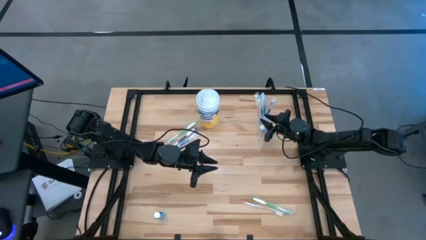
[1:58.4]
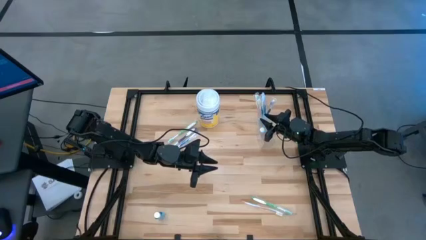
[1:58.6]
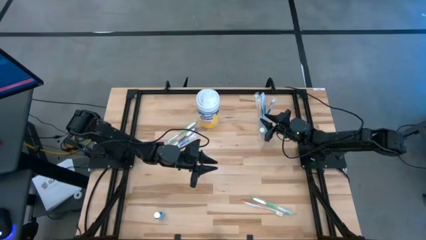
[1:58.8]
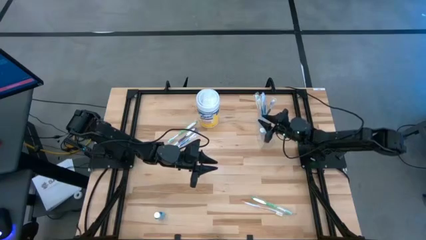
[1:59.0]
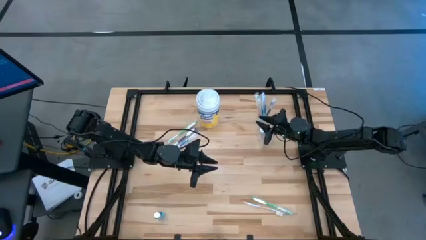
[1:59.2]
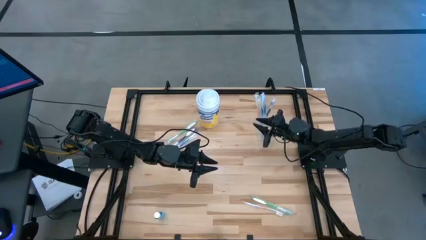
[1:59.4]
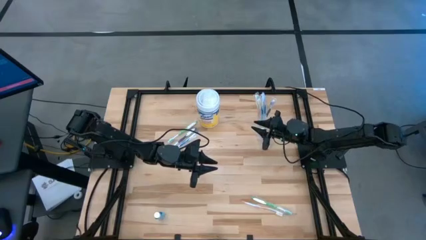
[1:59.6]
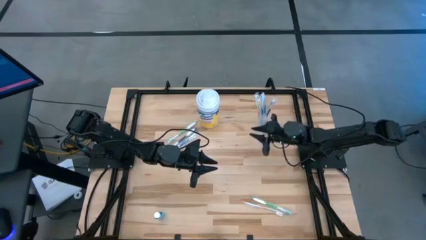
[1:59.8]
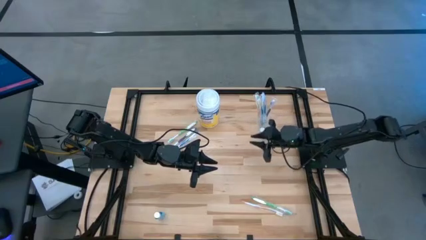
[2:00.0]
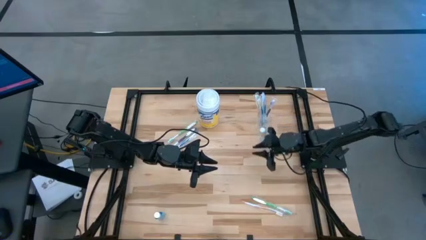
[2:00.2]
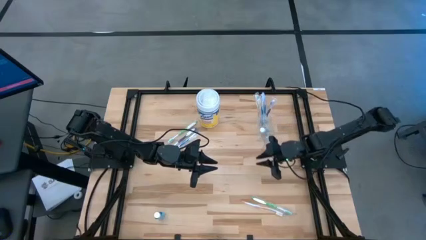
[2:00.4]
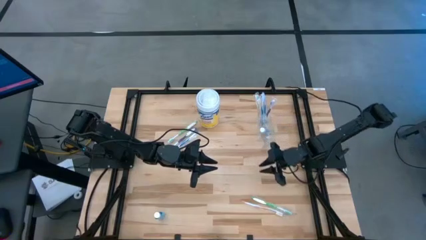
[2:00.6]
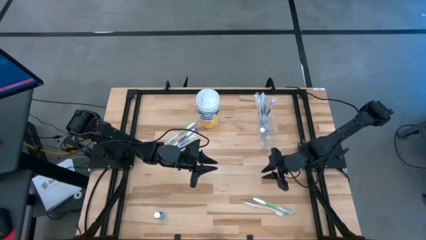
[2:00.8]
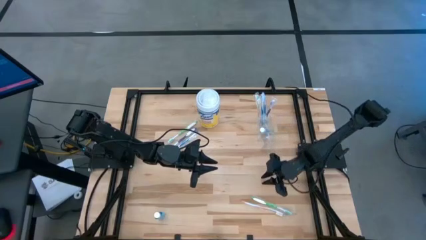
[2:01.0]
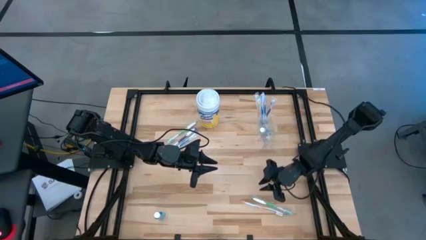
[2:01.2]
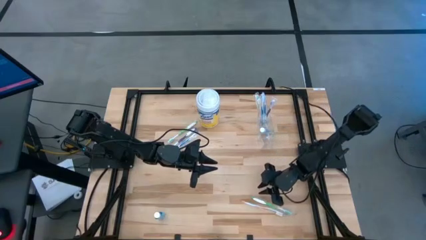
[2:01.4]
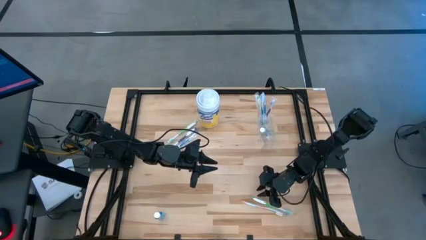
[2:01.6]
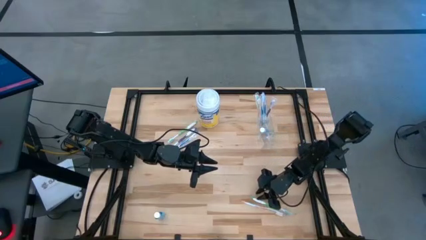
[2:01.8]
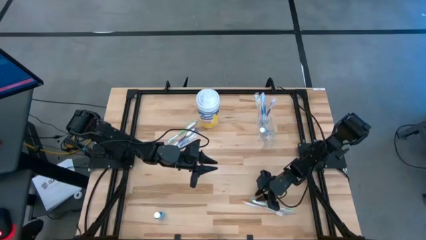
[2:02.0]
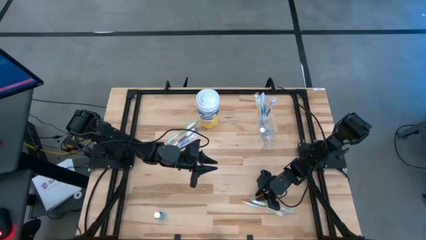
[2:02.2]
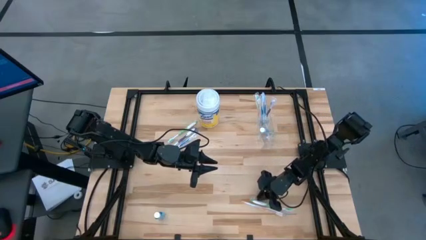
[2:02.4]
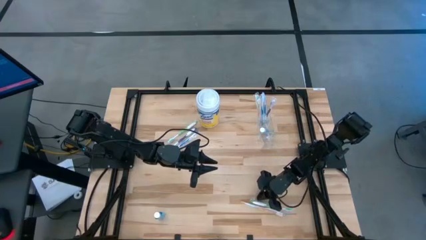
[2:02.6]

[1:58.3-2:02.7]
Task: Pick & Place toothbrushing station
Put the bottom green toothbrush into the transparent organizer

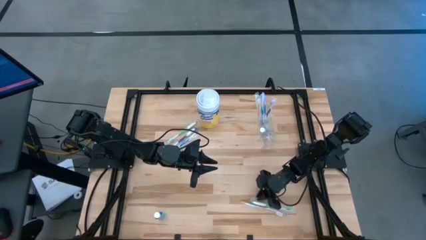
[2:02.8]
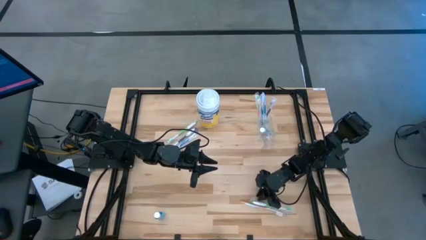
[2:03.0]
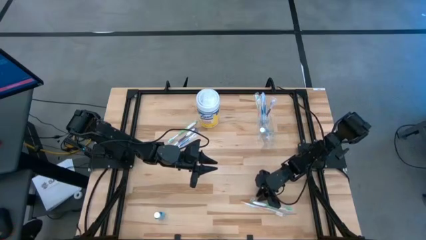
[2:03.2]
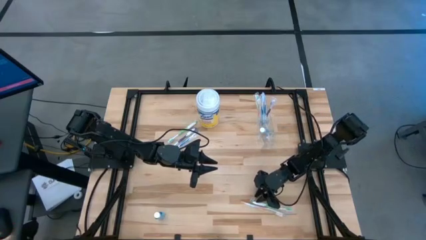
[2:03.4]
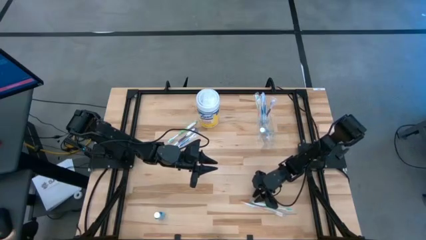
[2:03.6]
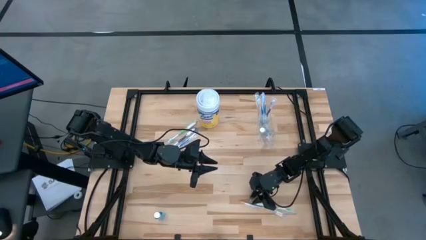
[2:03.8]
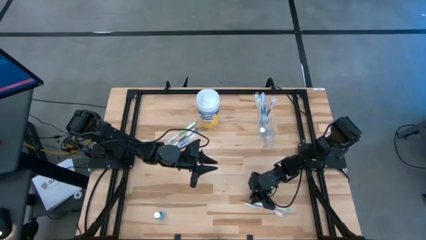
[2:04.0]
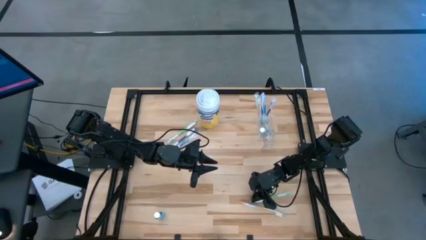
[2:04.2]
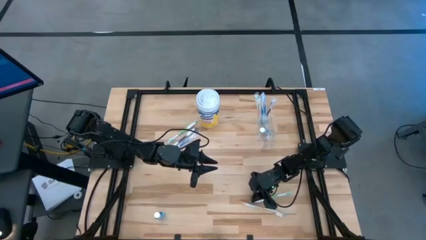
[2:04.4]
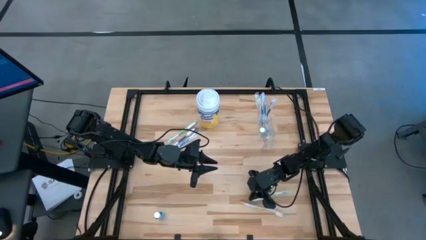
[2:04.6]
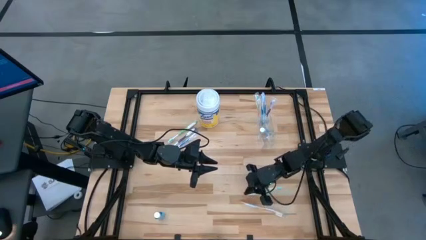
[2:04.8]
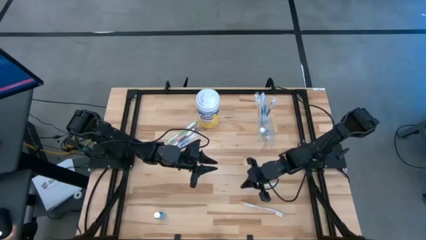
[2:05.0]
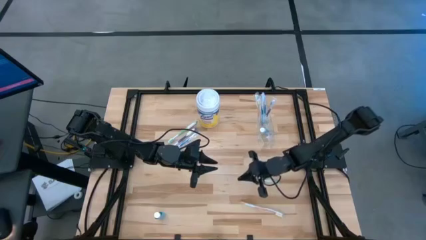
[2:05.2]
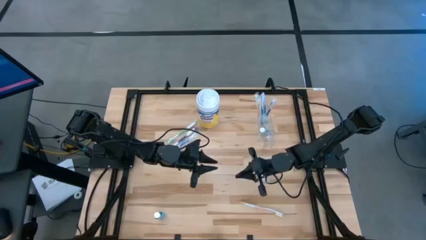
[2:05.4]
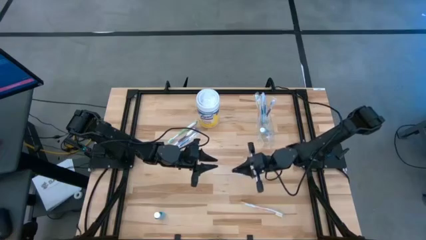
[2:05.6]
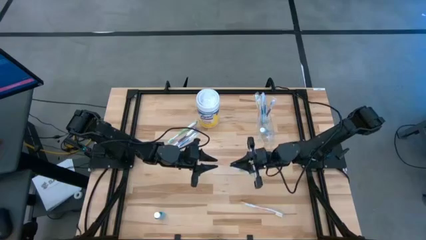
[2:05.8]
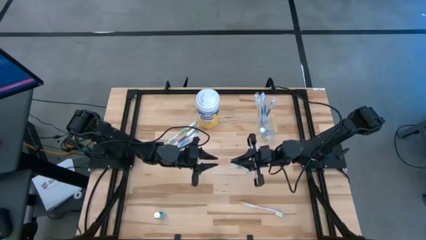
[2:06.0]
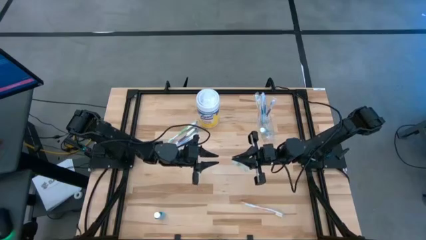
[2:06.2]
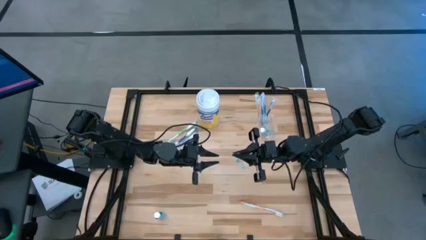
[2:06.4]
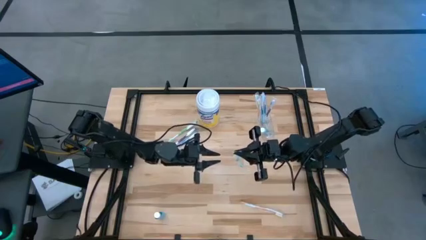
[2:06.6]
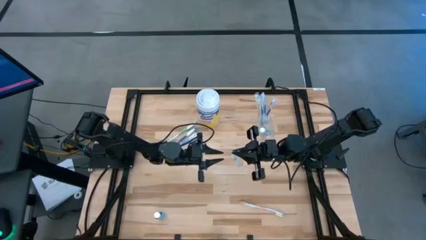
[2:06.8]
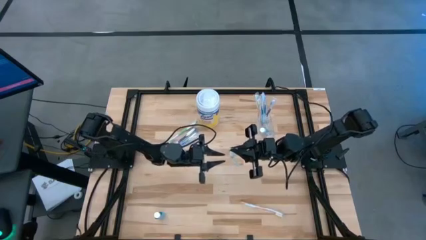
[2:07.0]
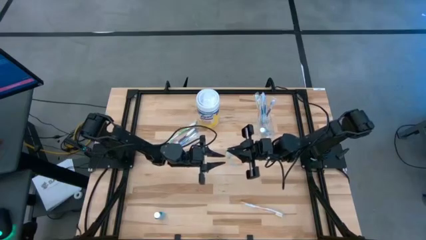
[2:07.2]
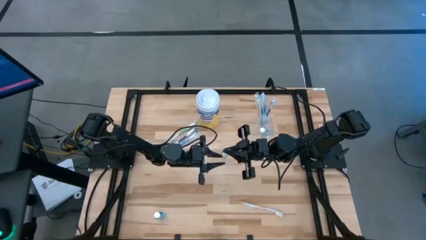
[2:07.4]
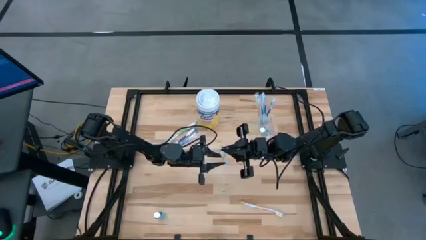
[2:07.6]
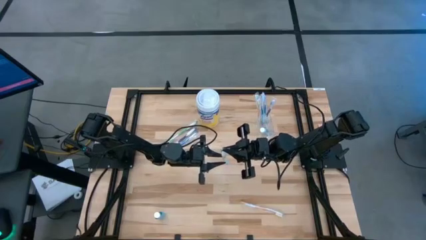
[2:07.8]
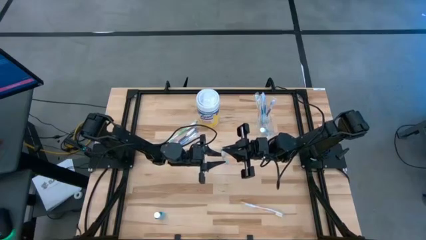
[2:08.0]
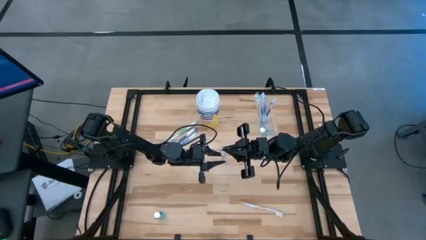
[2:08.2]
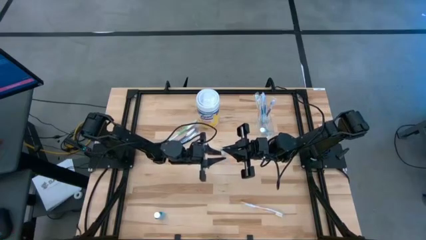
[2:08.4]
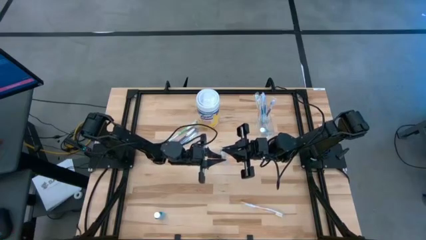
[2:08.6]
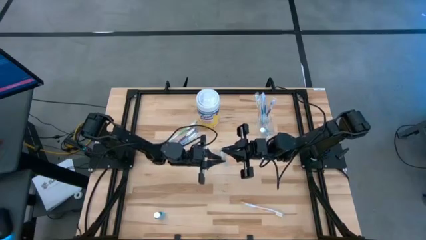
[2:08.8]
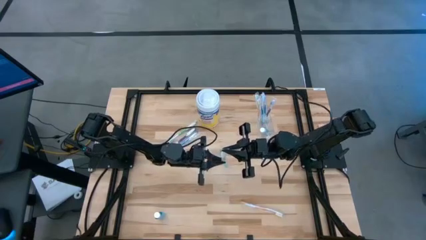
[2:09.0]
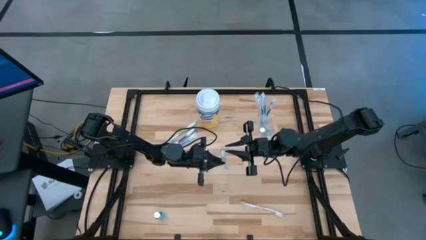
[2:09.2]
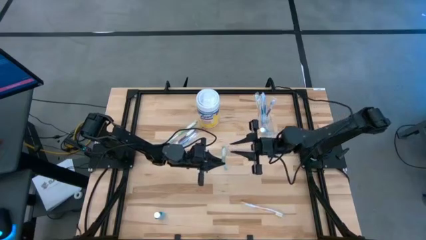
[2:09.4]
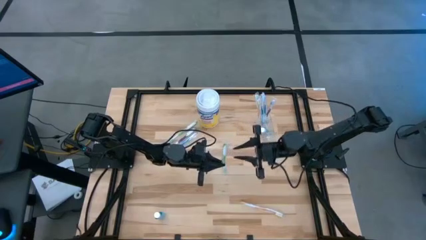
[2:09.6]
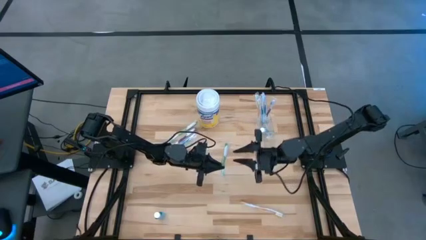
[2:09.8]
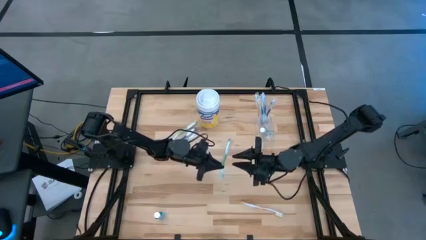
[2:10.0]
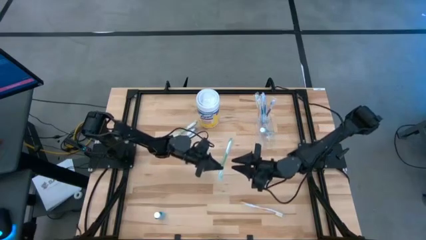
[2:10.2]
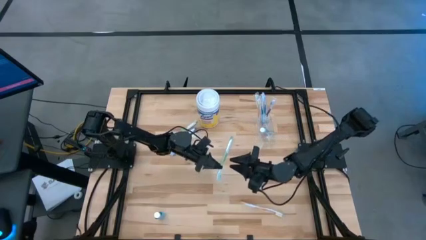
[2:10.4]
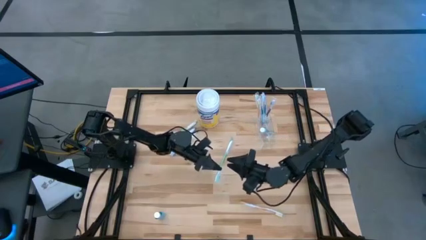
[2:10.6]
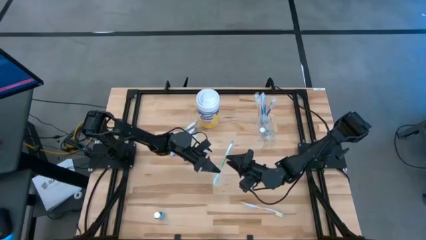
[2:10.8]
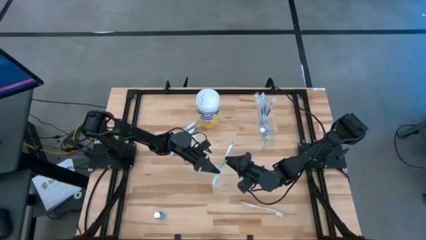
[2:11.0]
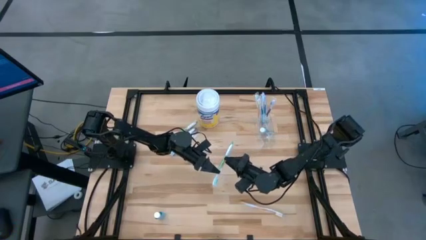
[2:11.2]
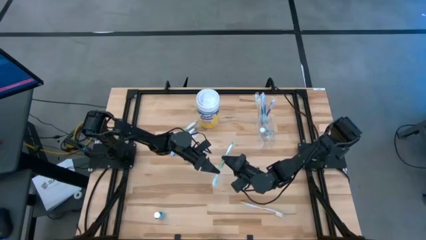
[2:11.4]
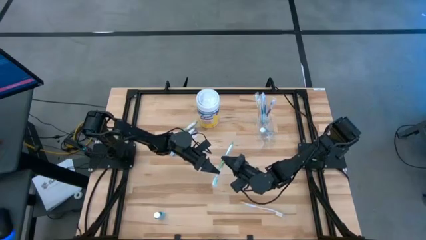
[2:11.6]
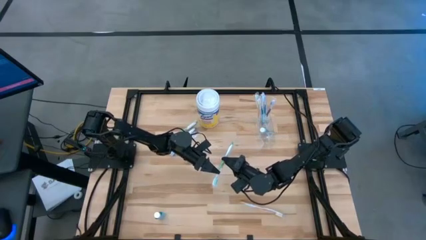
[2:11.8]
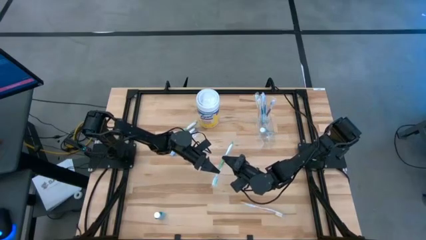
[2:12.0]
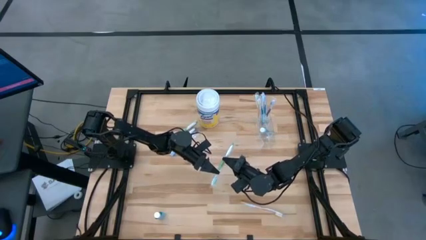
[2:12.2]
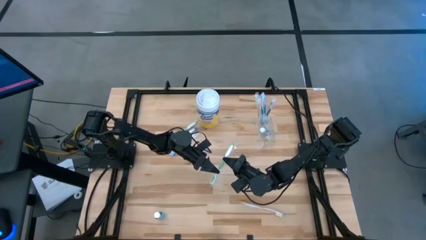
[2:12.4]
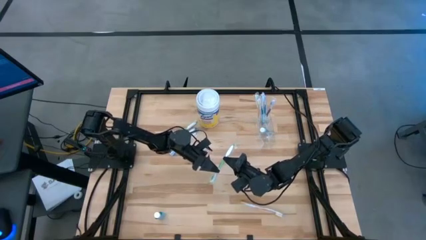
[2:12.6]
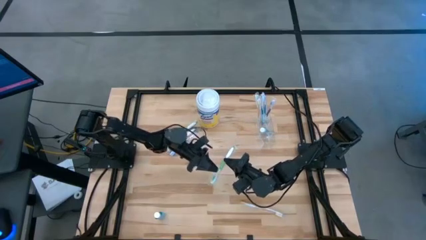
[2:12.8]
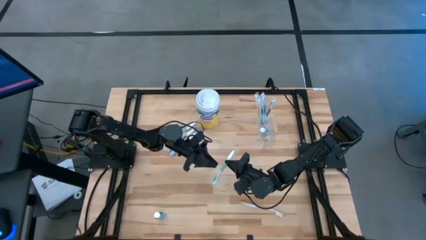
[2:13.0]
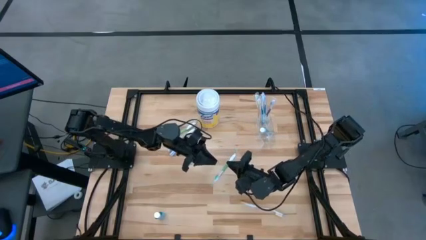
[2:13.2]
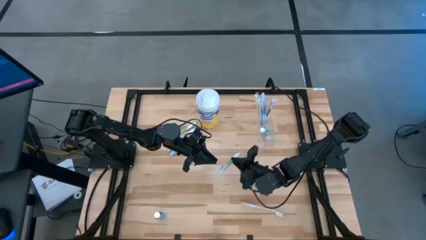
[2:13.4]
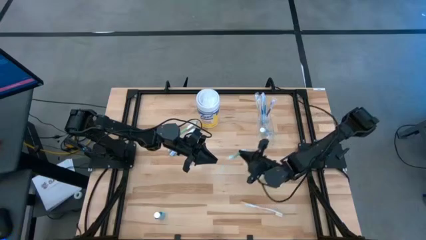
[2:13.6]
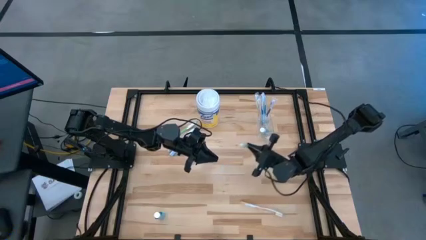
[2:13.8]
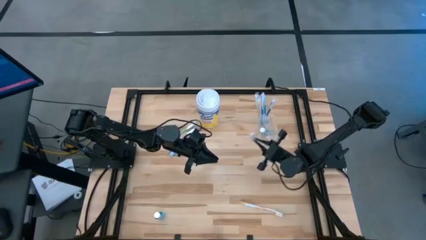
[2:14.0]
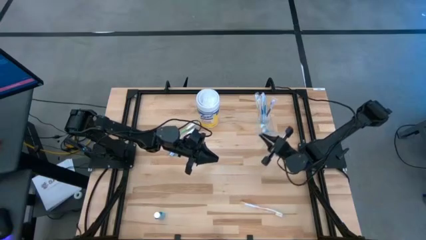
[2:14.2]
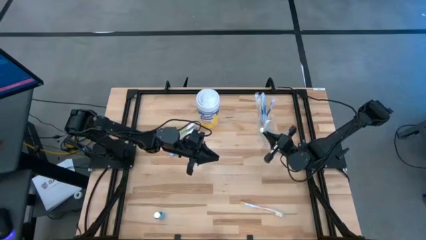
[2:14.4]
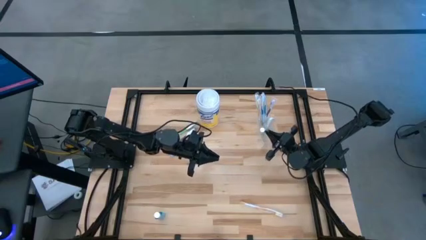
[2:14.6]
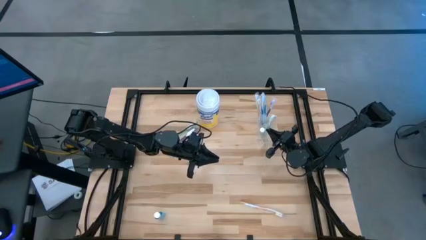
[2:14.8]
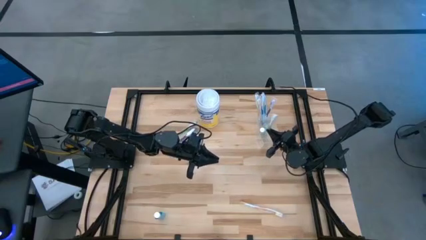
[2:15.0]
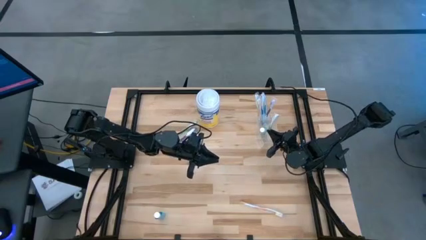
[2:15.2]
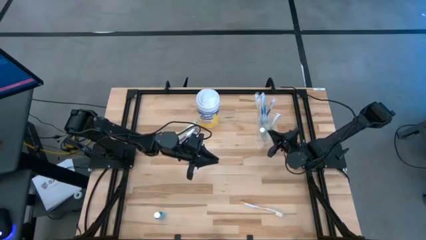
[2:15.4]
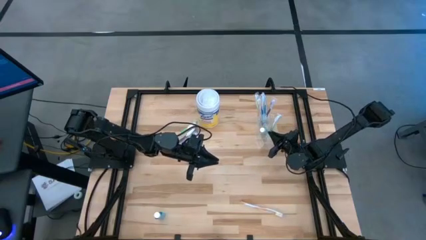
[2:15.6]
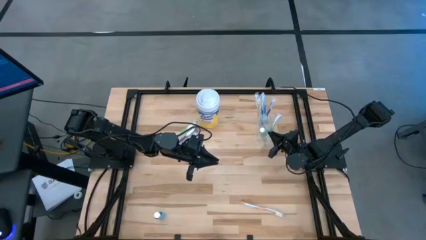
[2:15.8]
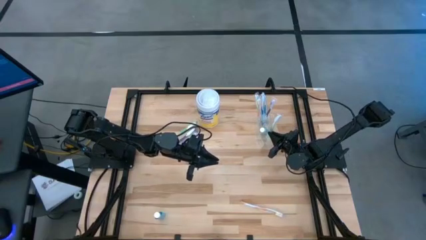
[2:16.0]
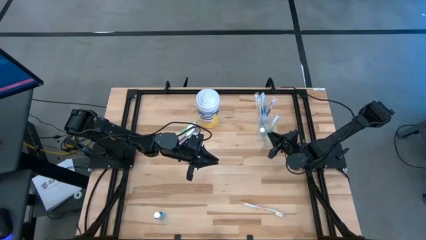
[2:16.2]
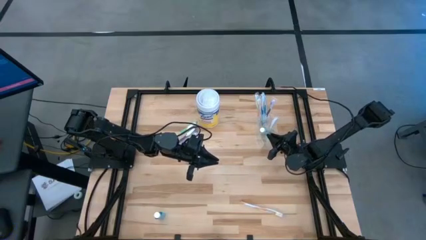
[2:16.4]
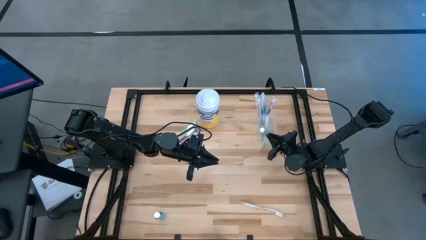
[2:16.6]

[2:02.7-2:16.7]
Put the bottom green toothbrush into the transparent organizer
